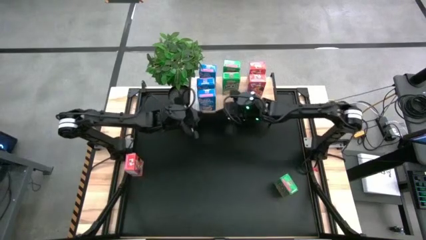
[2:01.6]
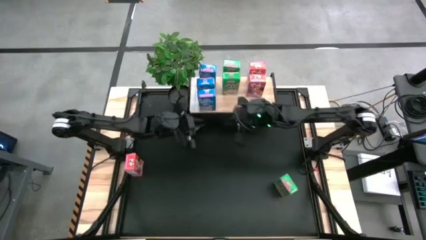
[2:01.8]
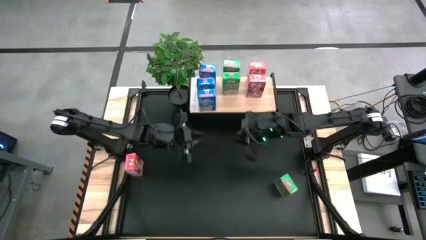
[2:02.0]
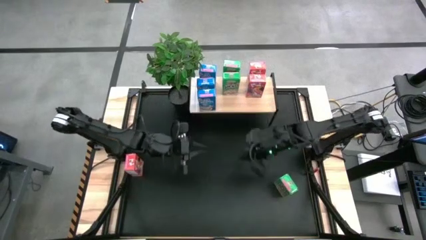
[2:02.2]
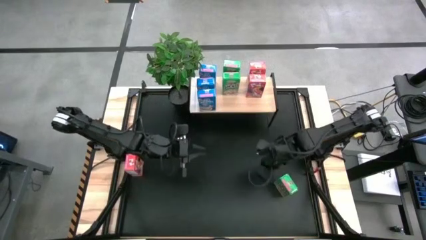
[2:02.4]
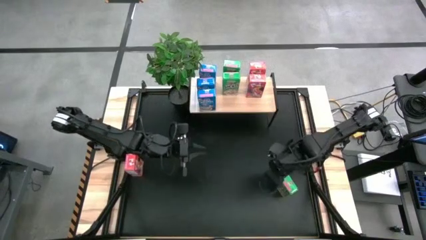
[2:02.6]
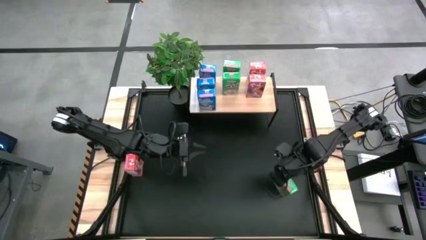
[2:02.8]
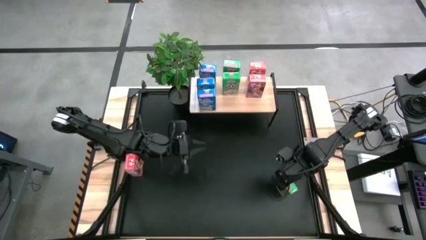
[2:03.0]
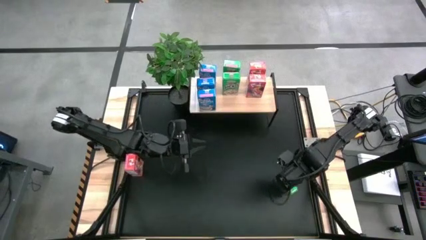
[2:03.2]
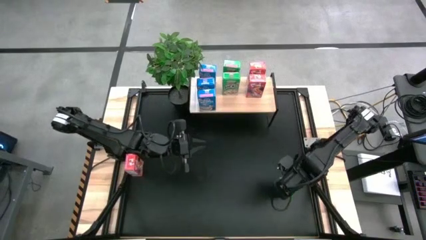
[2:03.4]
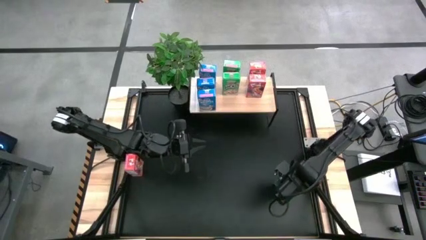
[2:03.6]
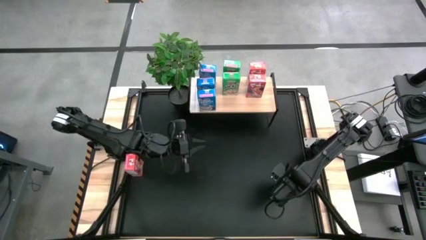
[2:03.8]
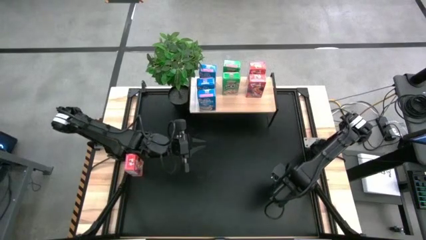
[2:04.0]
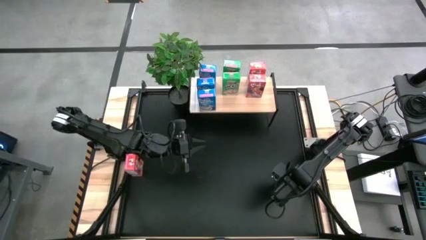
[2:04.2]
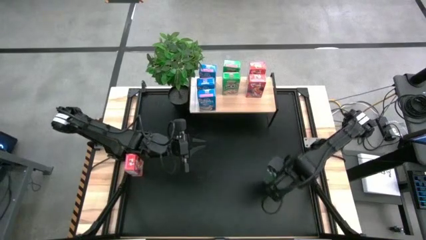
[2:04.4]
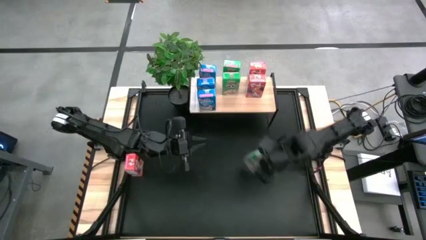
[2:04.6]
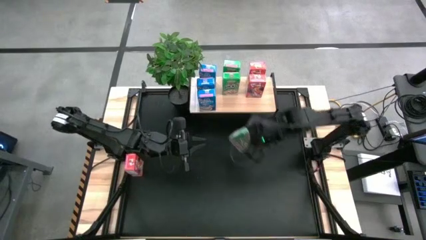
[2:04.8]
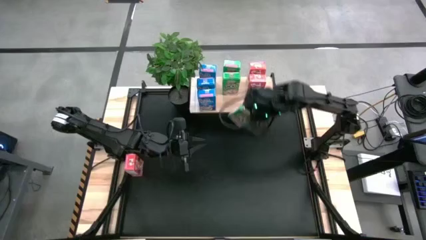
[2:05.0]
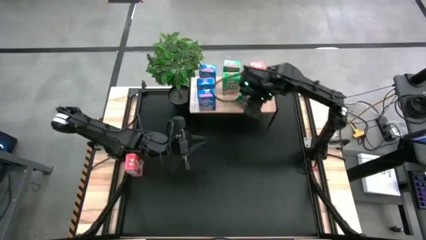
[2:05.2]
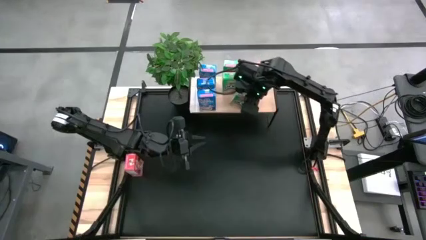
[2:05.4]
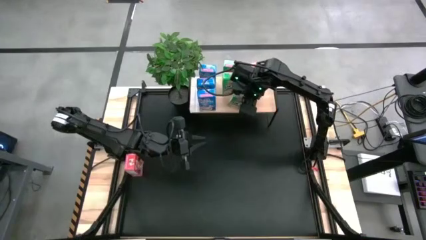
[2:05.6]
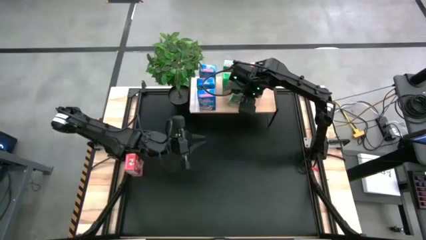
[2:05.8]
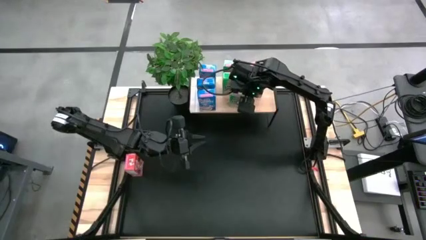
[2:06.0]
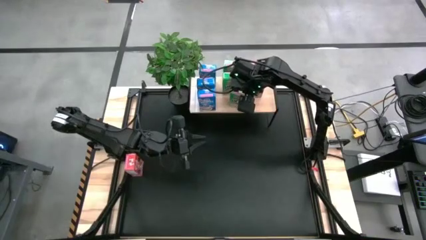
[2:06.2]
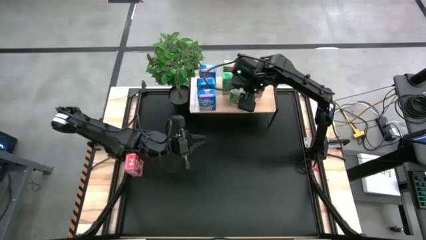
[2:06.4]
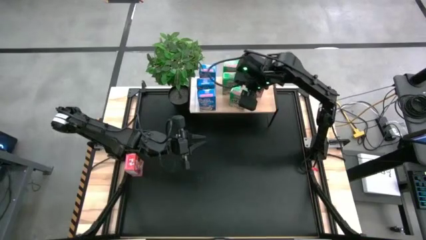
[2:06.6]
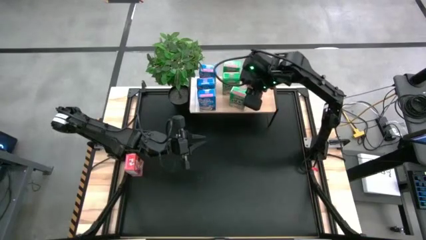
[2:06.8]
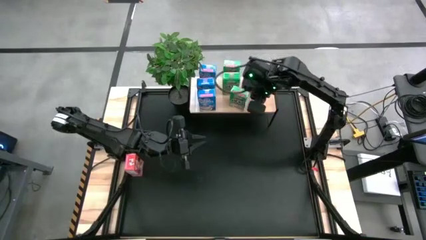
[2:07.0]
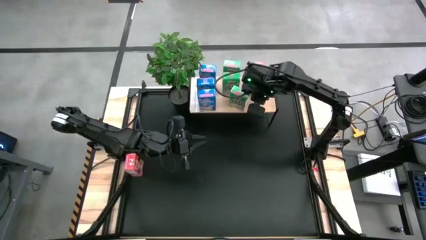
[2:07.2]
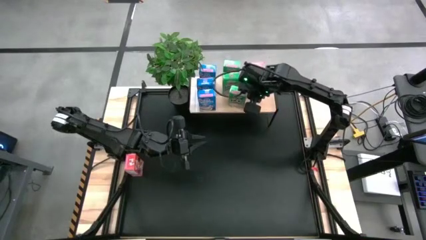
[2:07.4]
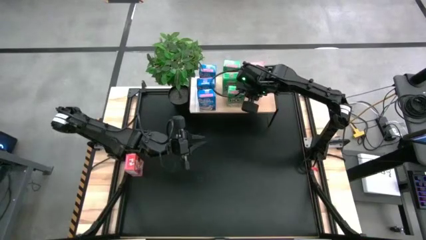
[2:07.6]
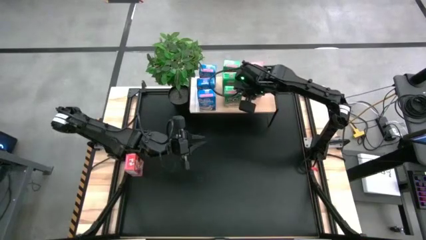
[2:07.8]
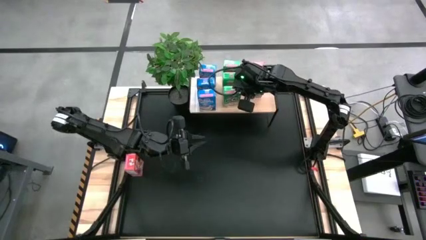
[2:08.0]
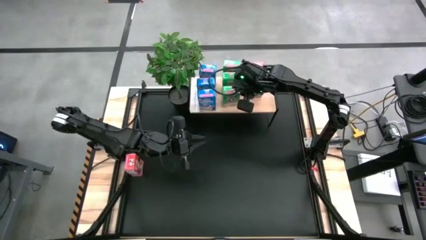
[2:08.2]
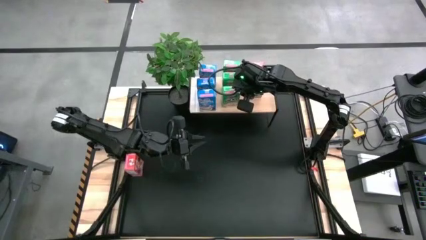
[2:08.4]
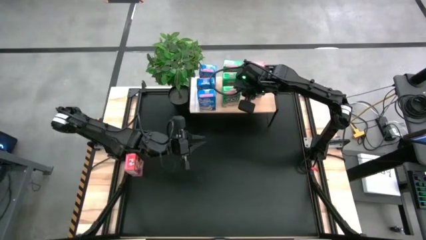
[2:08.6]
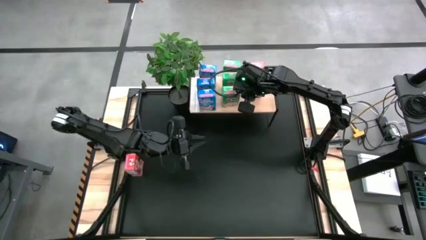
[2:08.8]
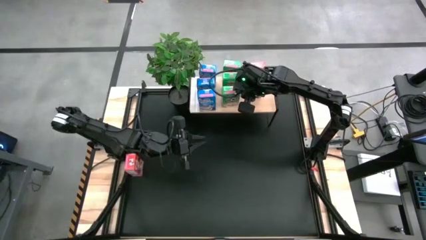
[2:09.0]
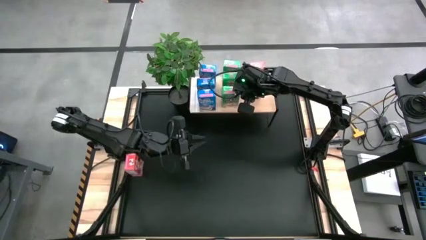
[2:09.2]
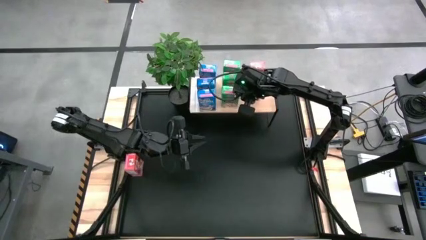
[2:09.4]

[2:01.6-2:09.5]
Task: Stack cereal on shelf
Put the green cereal box on the shelf, aligned with the other green cereal box

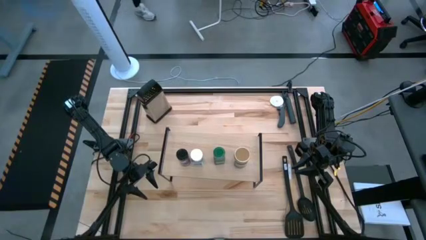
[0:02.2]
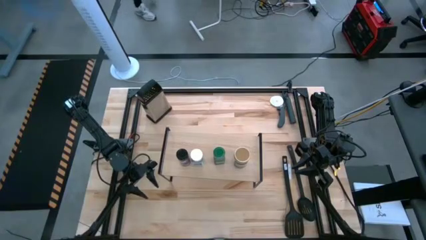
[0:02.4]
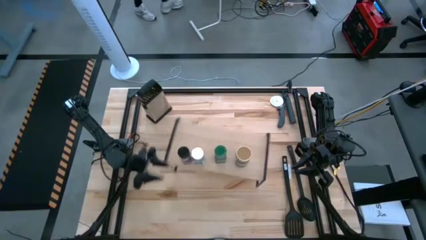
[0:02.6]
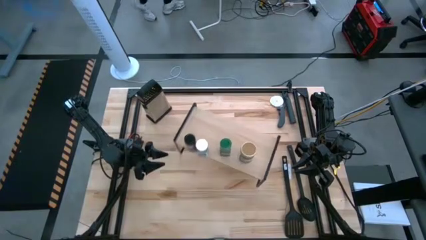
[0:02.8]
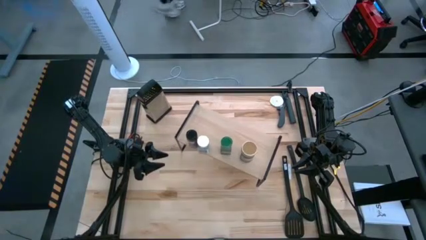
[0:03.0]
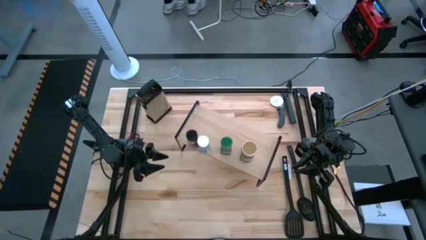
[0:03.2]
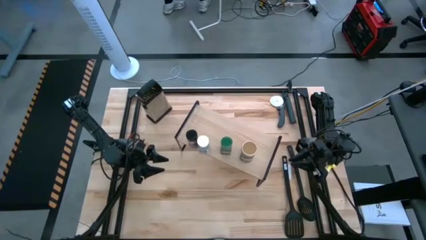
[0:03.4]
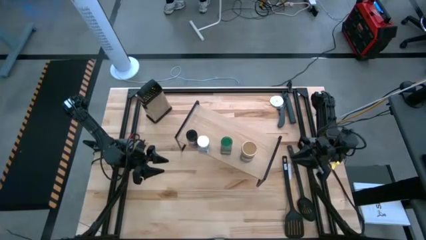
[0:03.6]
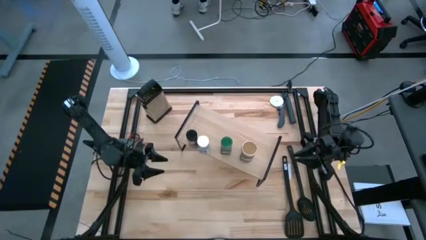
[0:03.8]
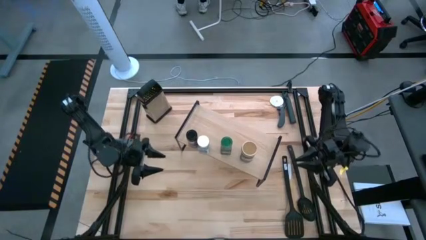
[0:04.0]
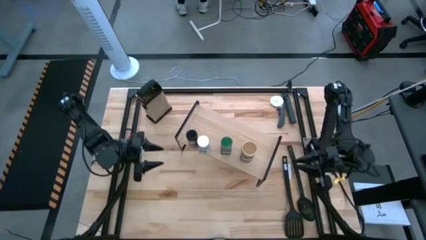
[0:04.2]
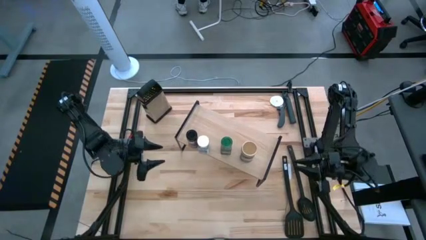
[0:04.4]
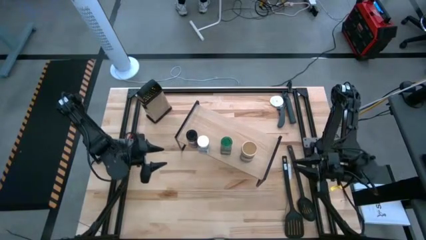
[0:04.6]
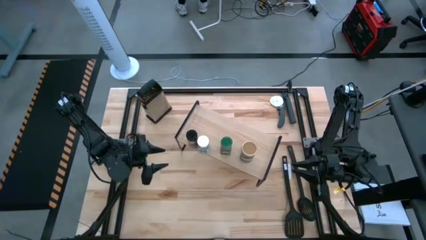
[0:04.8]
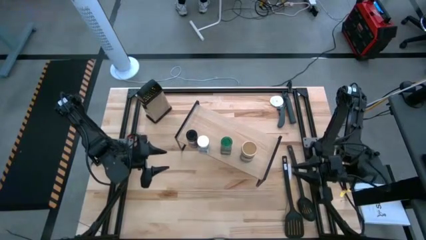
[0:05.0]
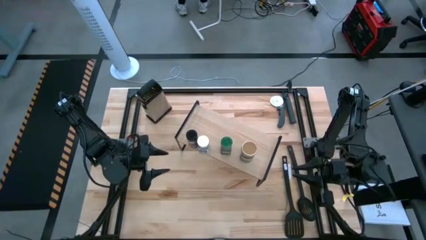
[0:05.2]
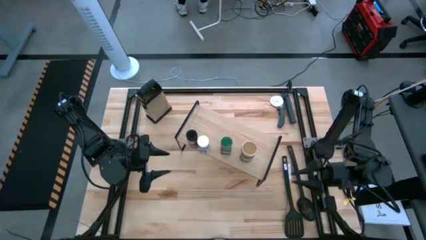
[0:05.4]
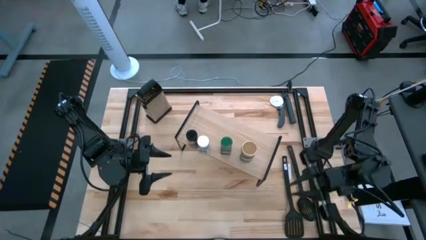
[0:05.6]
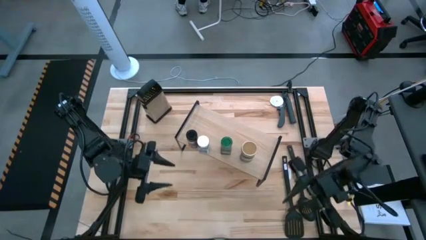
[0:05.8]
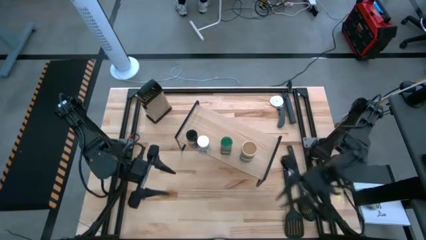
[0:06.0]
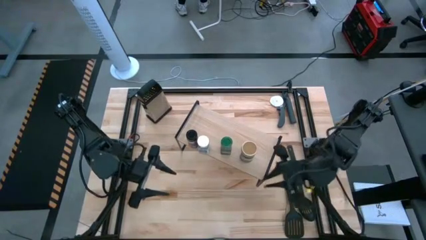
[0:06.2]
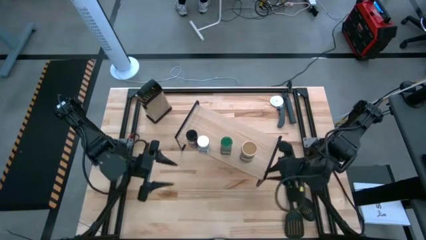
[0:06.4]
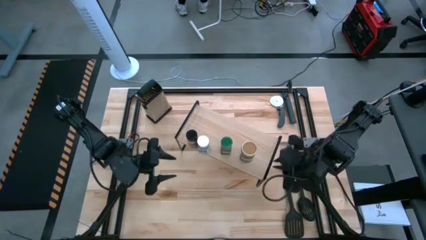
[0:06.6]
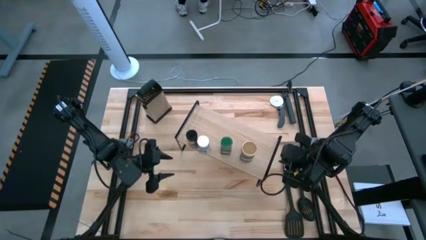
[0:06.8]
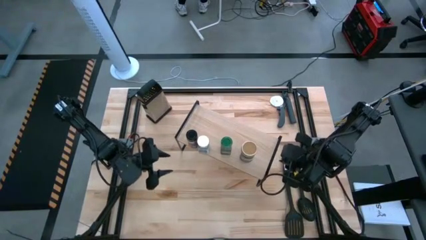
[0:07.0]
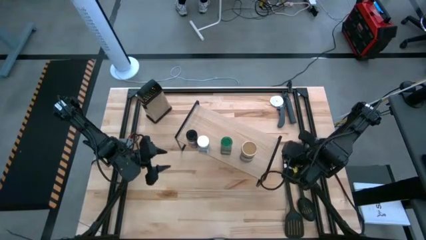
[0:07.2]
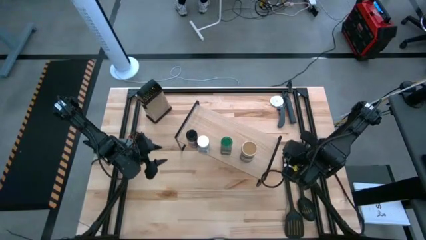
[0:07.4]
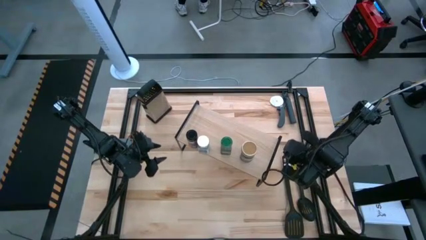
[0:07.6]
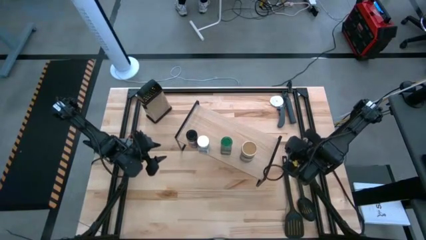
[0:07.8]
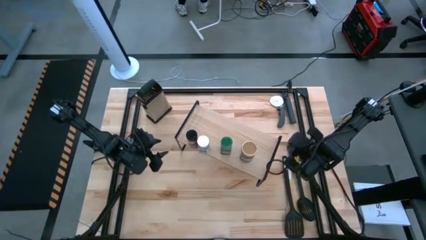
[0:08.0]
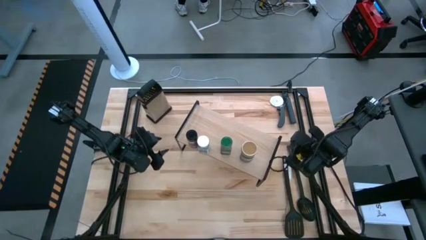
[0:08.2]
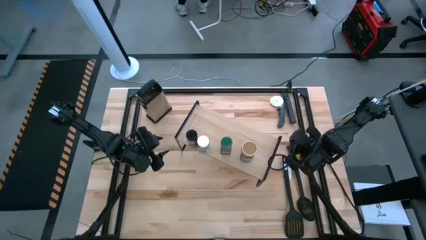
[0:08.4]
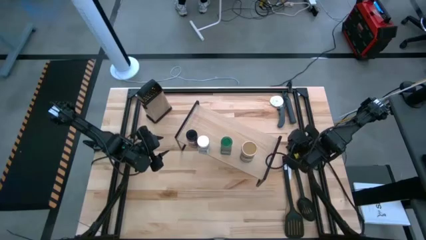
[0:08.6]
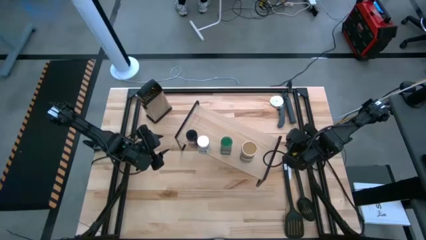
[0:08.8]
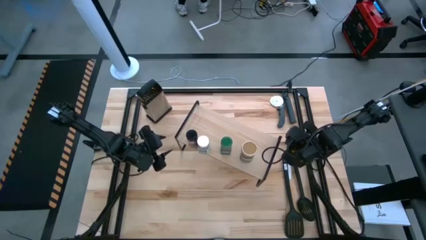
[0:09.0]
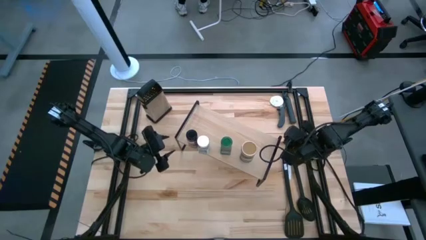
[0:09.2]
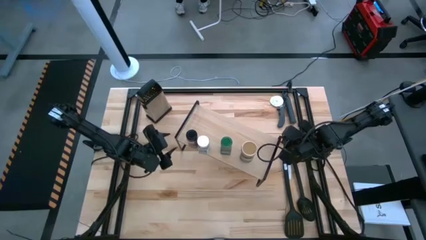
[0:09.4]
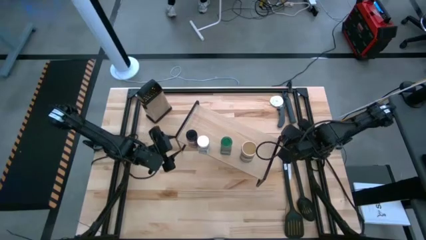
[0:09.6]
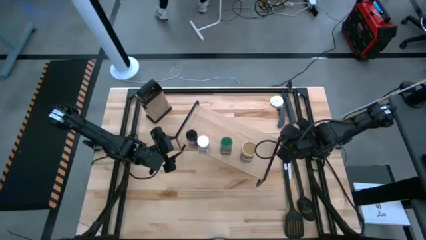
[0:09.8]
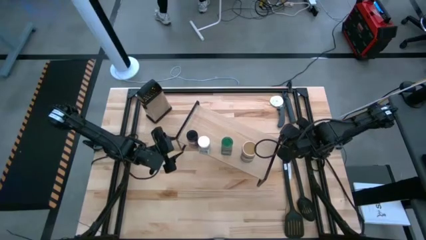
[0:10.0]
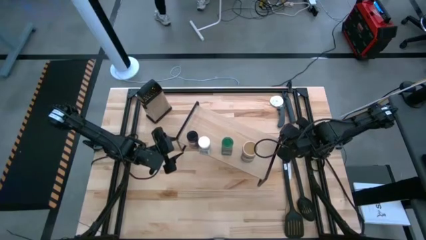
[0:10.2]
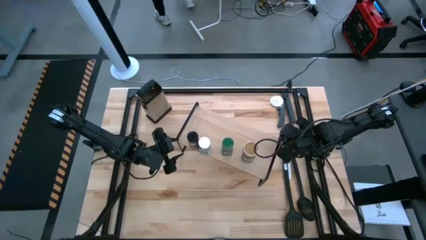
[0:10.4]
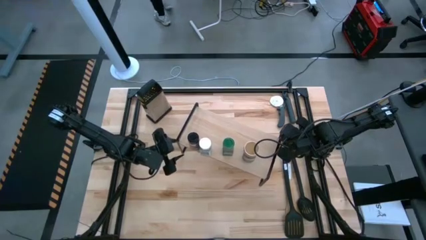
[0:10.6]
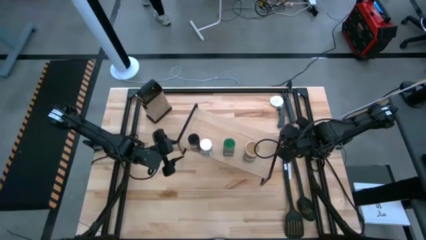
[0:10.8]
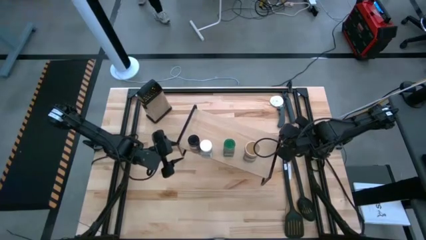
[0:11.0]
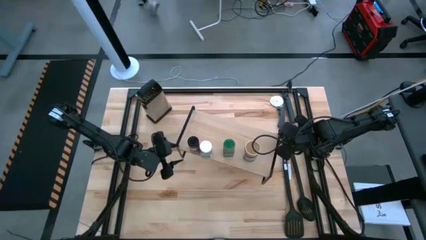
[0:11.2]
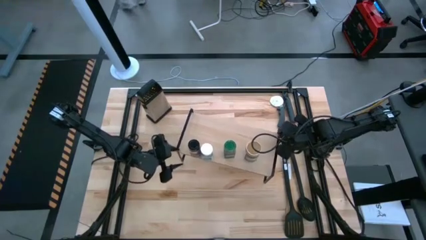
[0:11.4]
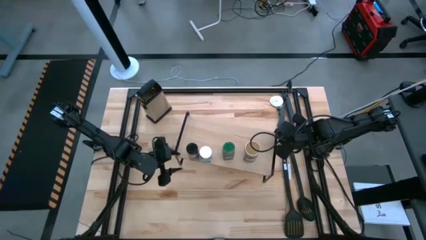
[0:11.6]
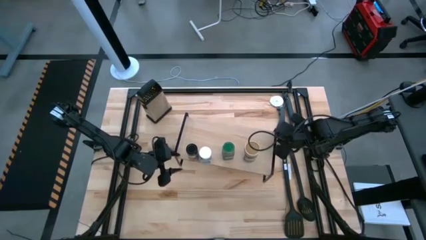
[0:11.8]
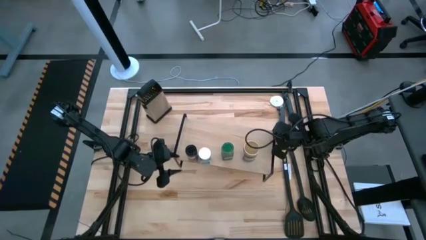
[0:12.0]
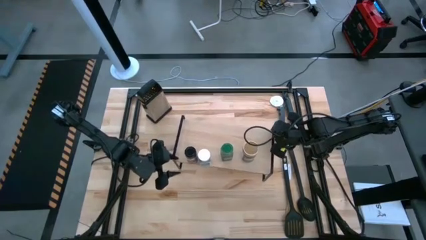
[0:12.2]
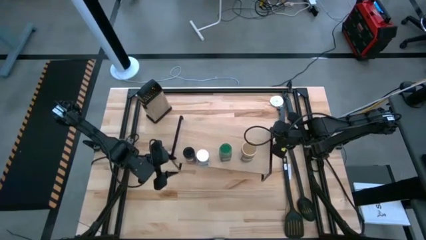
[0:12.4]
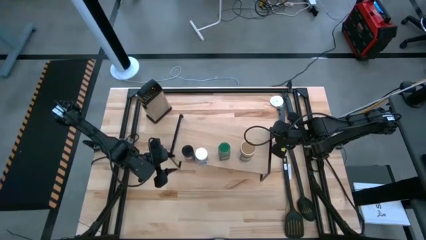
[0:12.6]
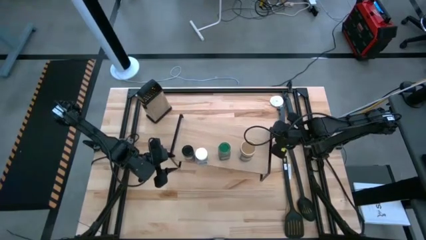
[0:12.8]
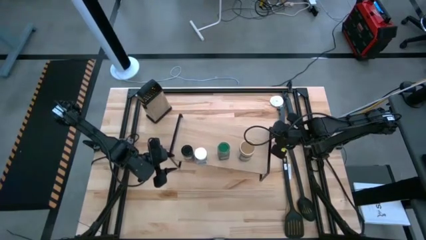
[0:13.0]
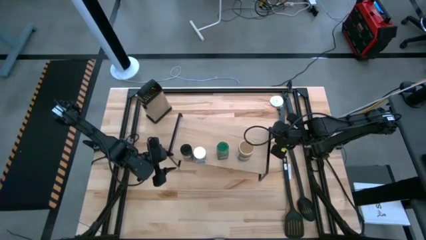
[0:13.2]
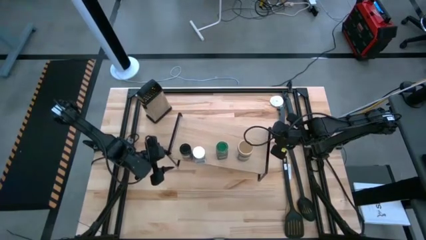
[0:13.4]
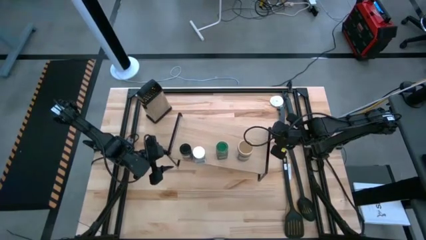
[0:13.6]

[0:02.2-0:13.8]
Task: Shelf spices
Adjust the shelf
